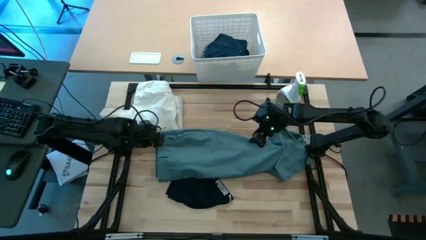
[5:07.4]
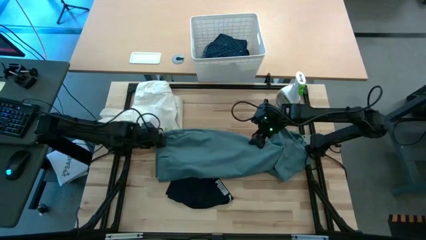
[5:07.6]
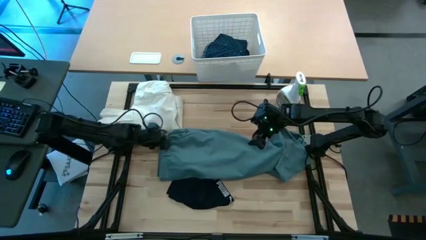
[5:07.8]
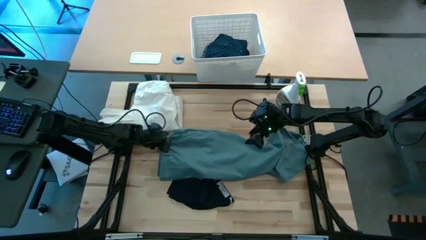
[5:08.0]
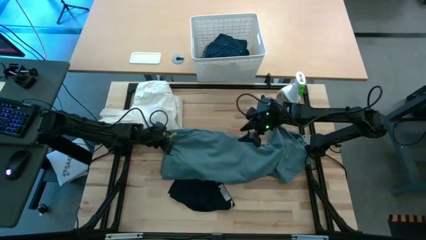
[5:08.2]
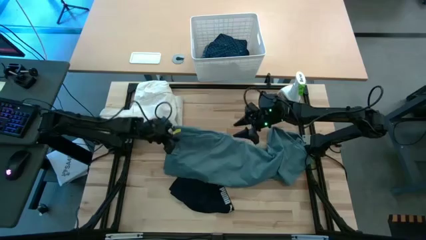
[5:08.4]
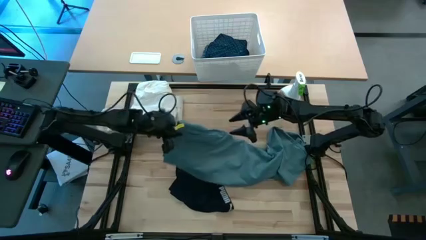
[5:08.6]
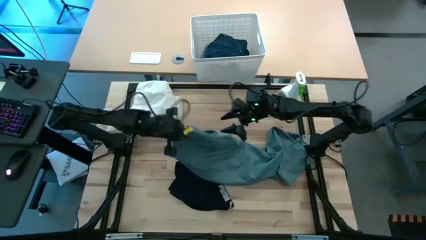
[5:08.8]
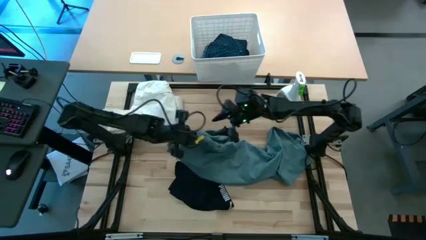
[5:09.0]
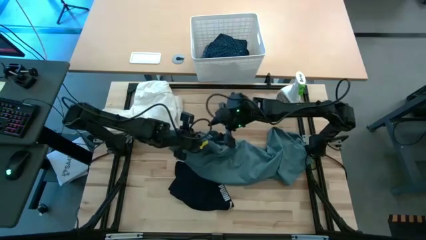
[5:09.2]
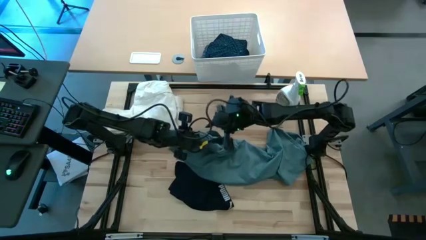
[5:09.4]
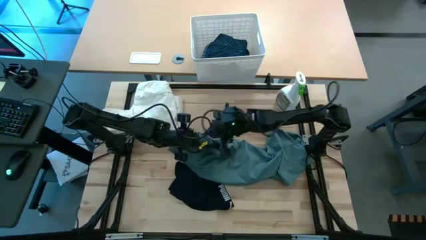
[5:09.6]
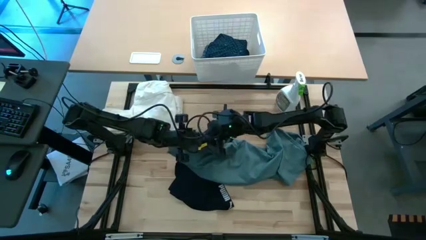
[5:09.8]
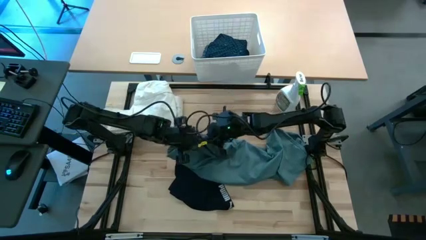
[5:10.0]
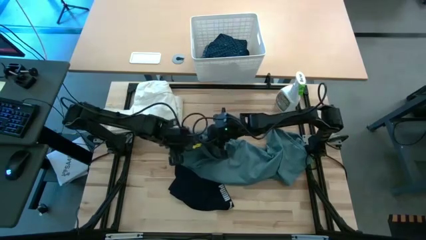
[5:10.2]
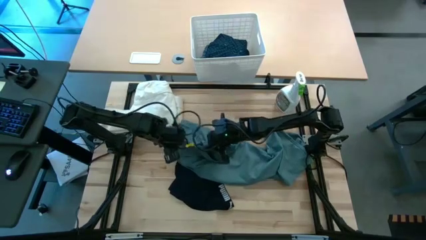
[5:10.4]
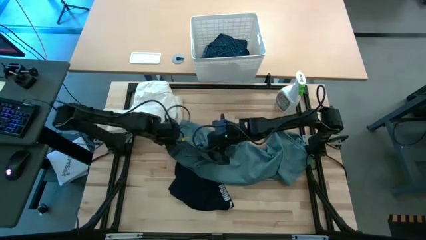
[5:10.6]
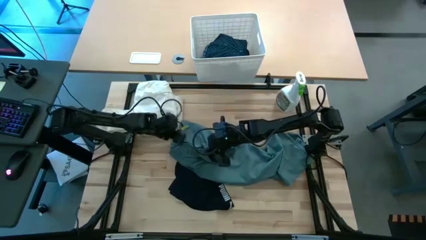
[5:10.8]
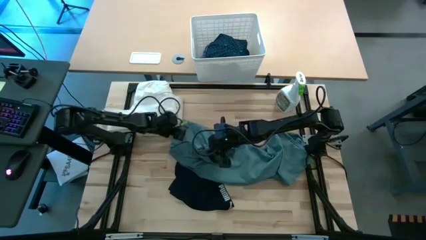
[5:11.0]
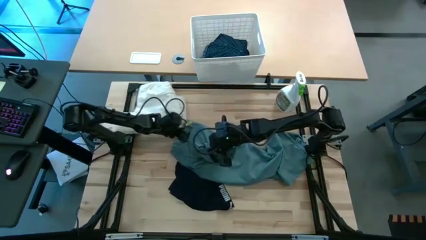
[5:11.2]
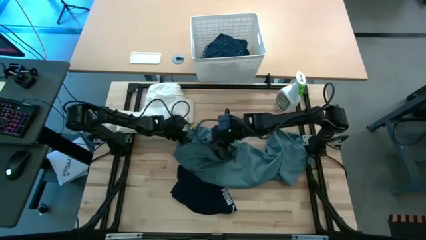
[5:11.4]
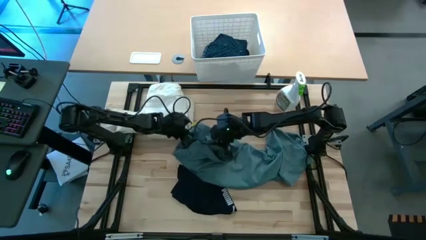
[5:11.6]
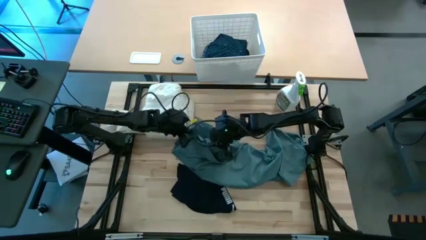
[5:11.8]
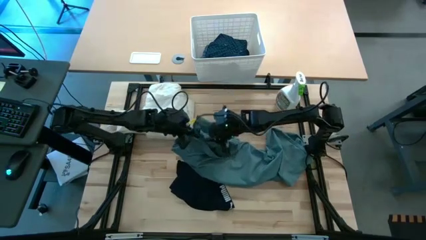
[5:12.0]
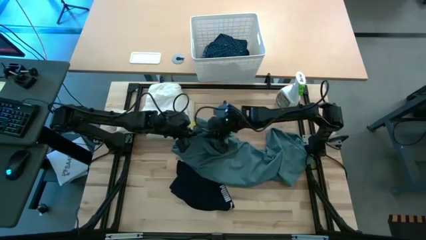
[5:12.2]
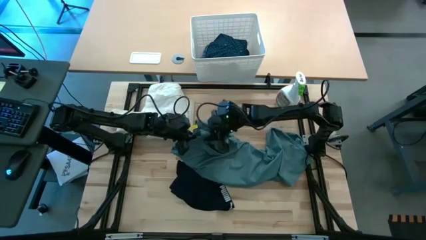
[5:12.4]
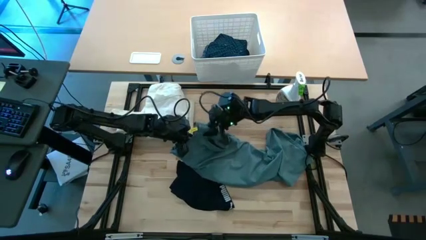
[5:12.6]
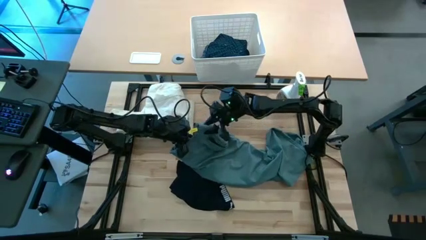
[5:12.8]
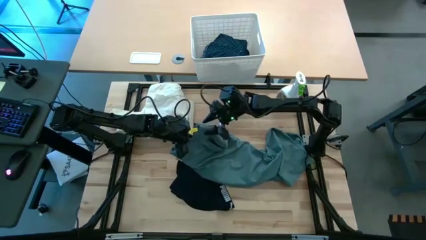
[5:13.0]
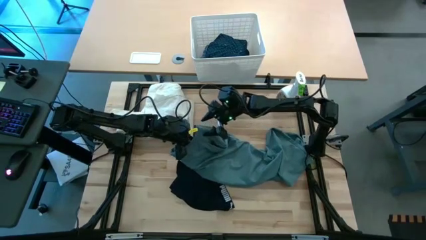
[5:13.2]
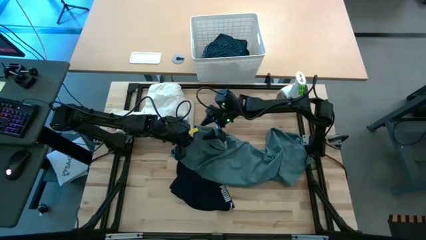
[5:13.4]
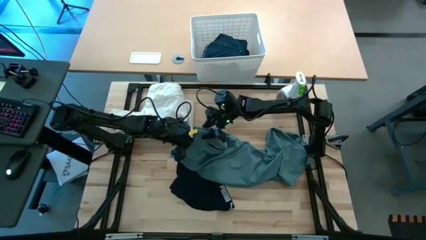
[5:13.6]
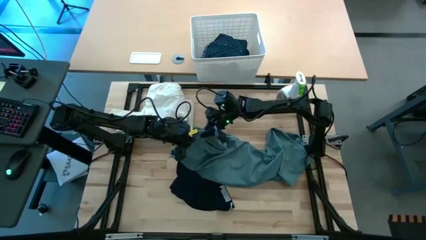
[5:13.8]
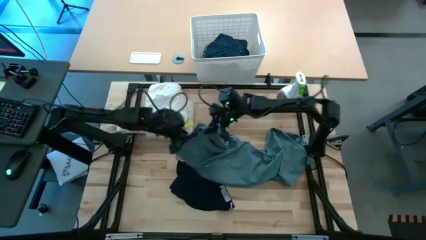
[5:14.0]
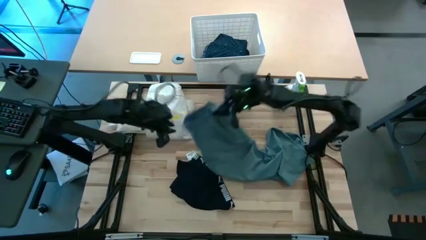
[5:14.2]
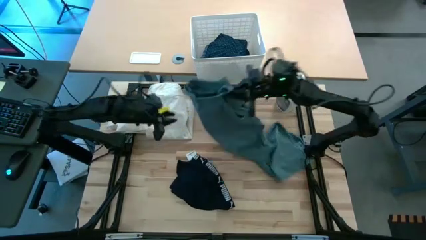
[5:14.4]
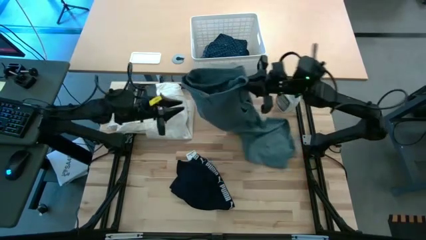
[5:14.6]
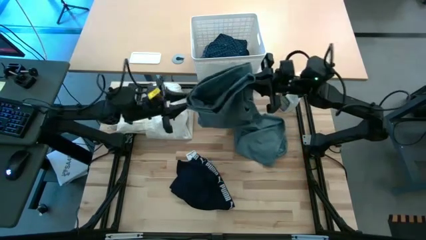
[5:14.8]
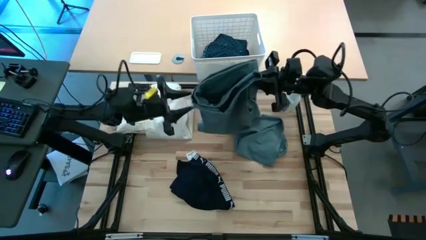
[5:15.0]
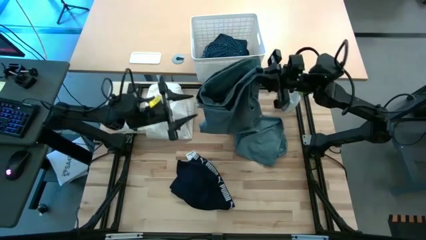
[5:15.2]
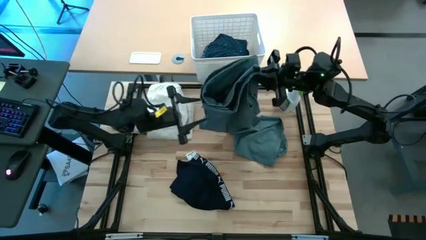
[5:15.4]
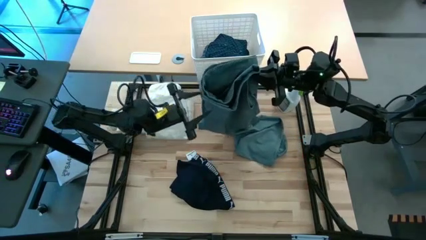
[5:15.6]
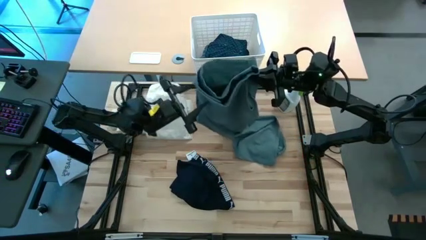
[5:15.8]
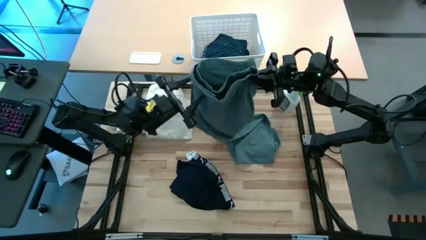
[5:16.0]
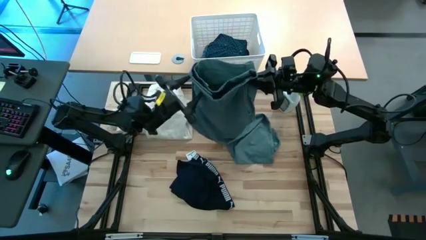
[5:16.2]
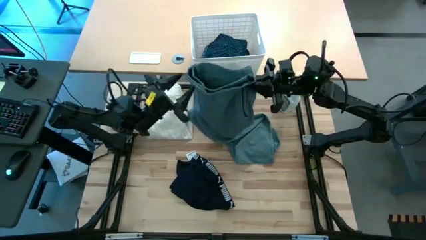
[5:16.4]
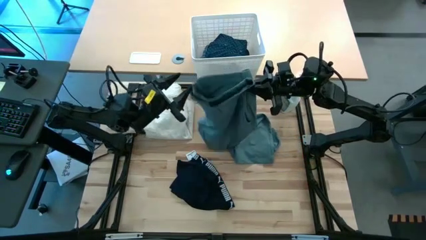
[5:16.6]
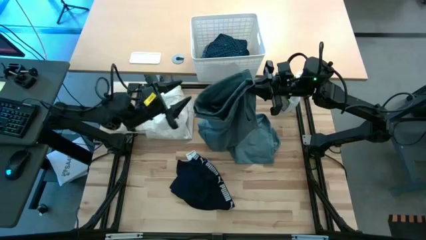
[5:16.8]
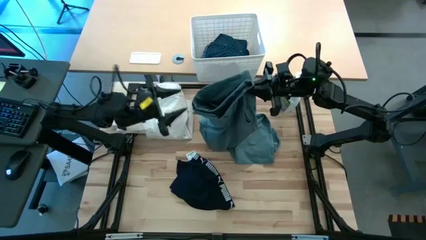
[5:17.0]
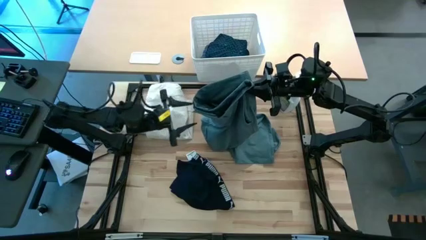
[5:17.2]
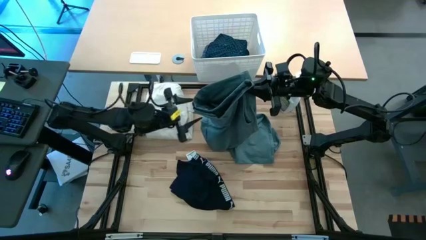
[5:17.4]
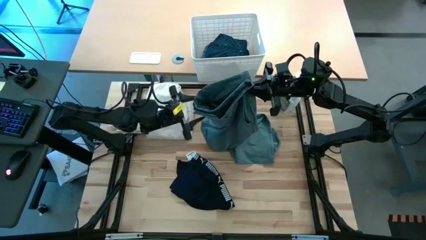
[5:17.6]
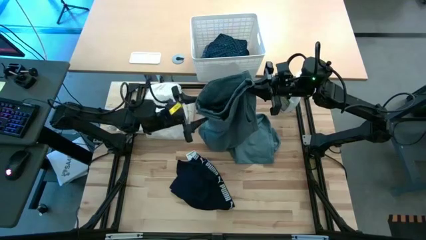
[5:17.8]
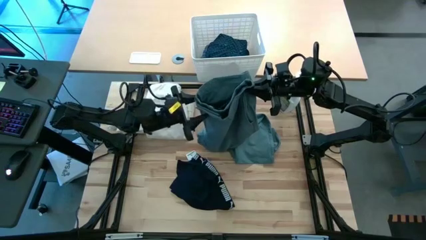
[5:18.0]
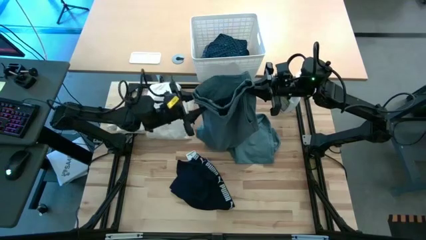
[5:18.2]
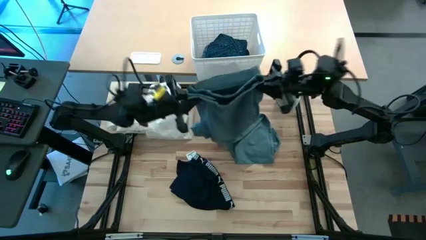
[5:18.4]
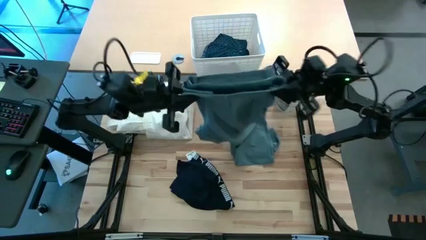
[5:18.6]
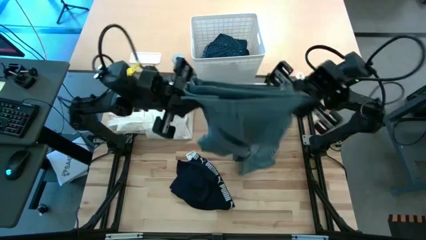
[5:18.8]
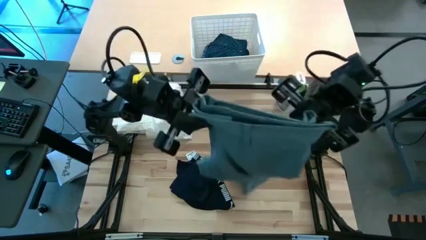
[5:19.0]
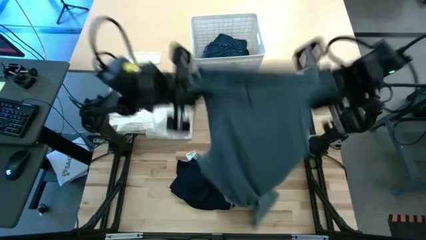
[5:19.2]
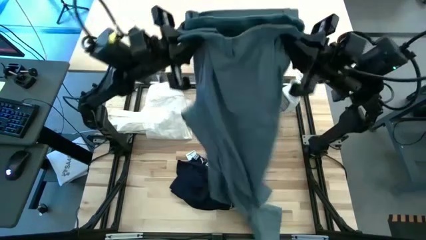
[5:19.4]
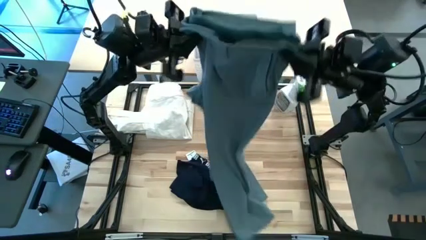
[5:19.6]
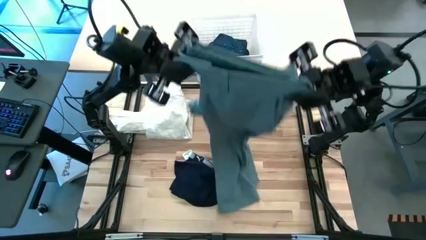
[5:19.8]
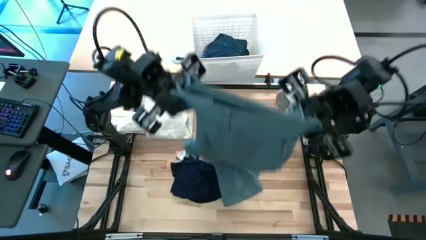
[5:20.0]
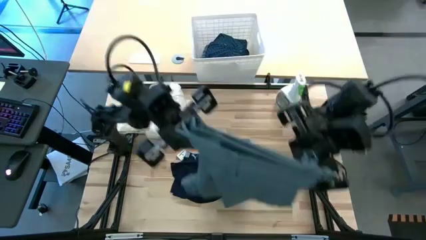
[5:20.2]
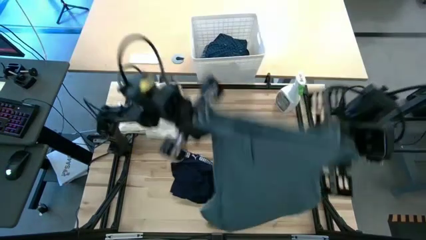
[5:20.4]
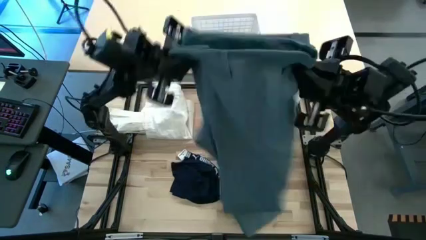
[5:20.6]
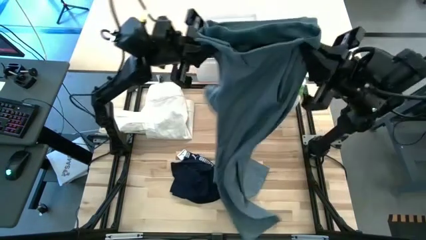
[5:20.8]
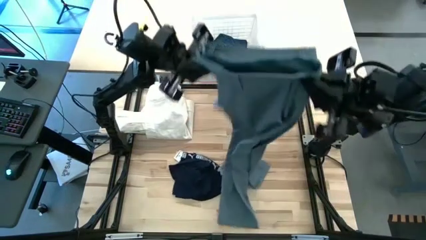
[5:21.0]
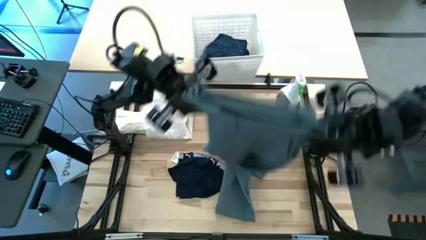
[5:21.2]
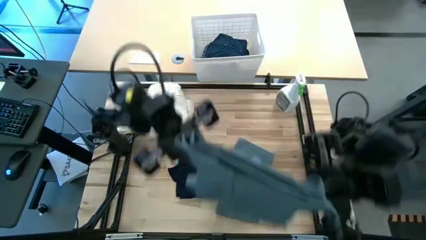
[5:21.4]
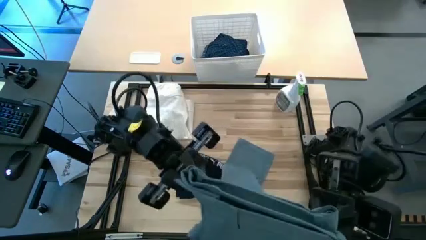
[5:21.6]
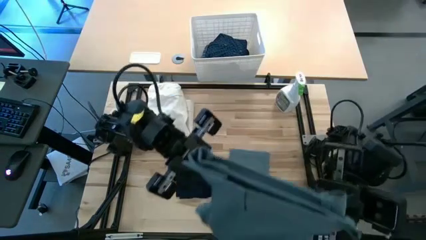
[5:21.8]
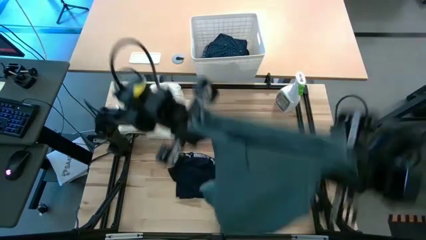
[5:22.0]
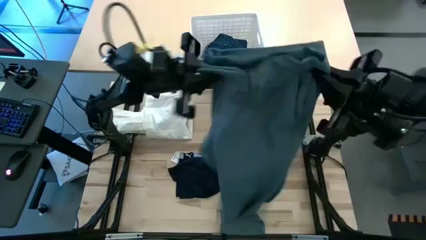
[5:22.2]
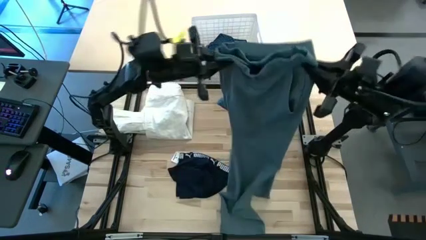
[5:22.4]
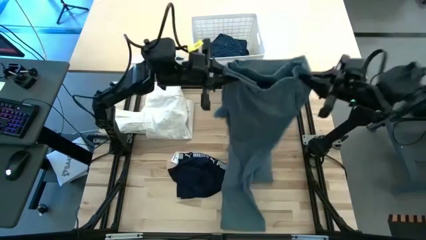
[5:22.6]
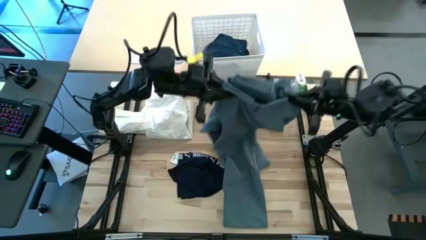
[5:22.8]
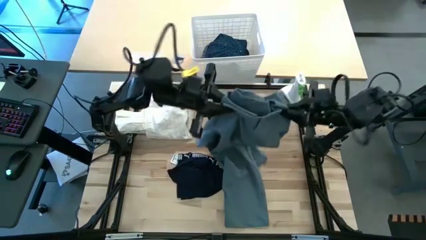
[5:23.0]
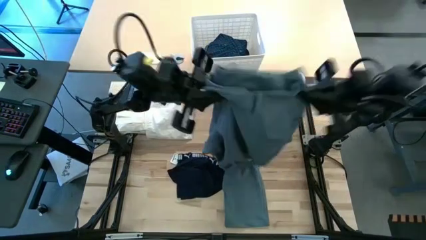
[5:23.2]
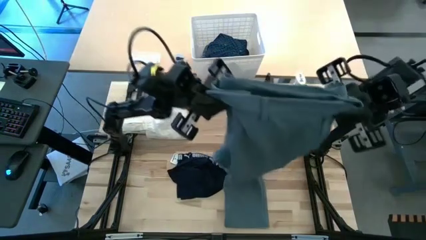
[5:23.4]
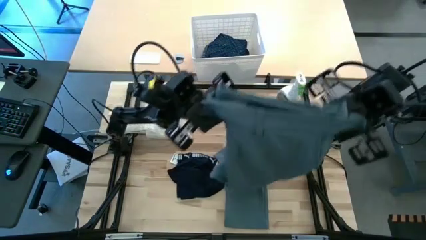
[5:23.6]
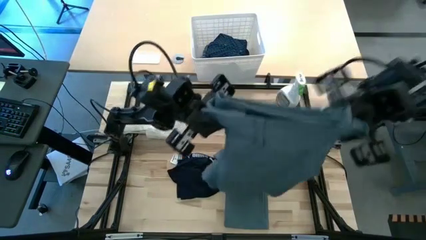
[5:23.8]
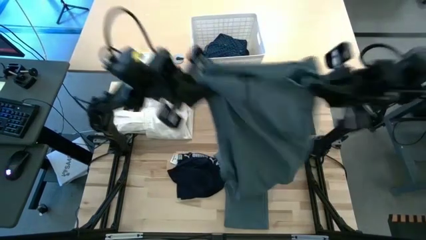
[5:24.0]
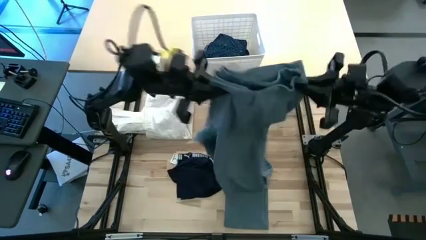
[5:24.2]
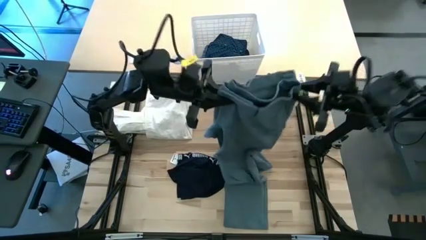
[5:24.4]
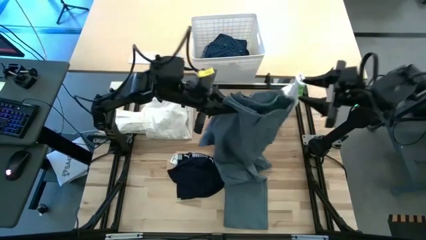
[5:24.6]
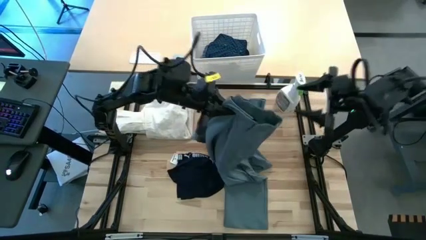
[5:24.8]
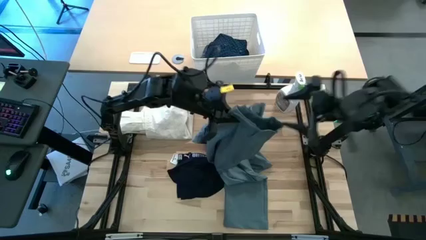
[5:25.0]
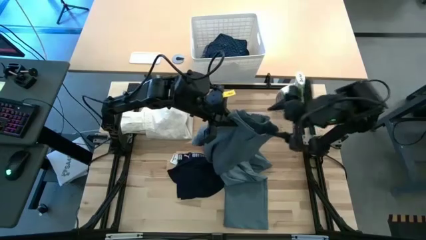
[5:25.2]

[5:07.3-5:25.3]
Fold the green pants
